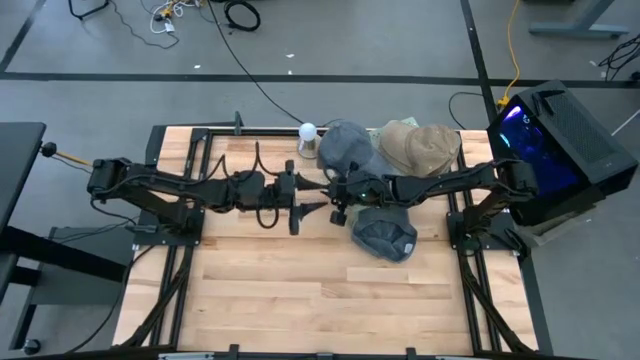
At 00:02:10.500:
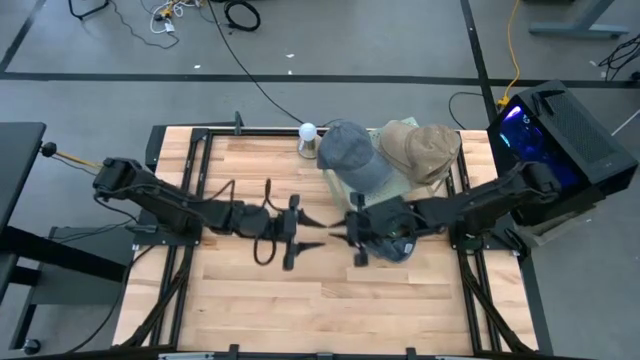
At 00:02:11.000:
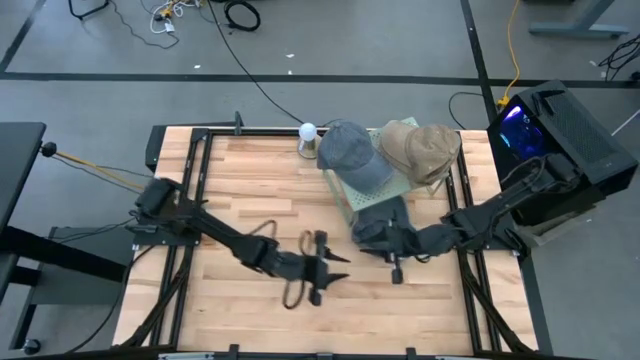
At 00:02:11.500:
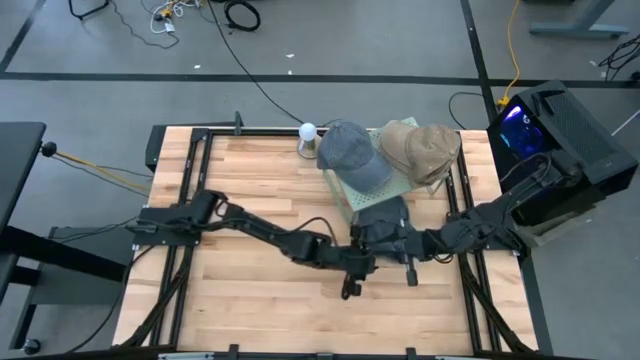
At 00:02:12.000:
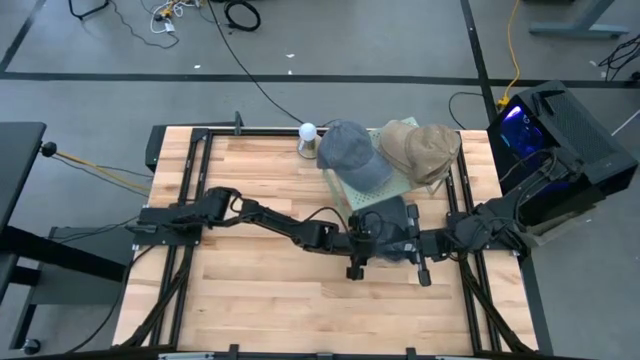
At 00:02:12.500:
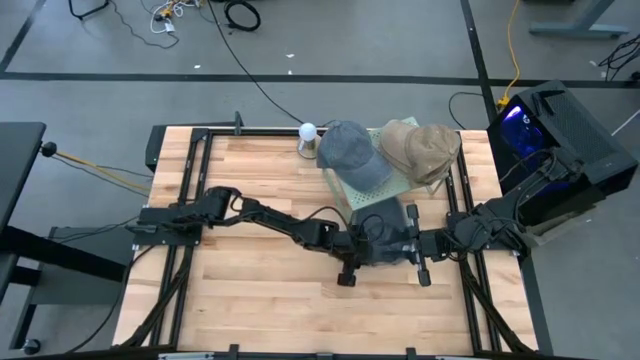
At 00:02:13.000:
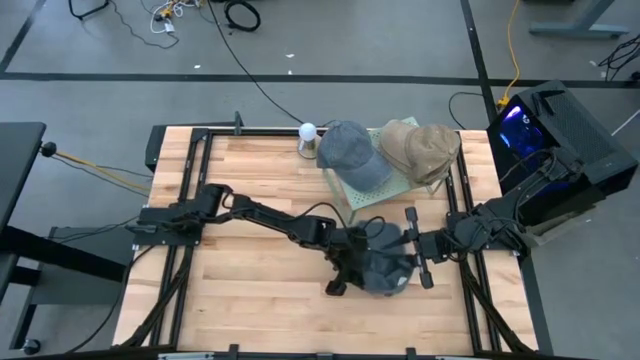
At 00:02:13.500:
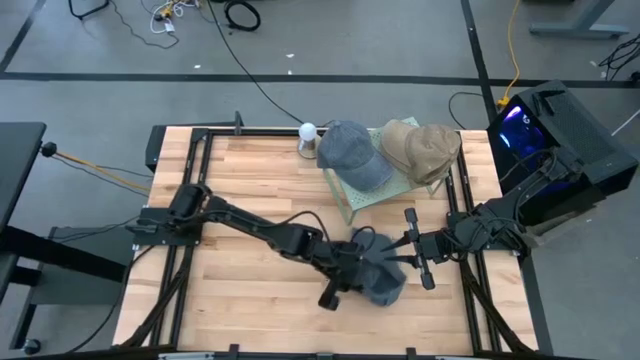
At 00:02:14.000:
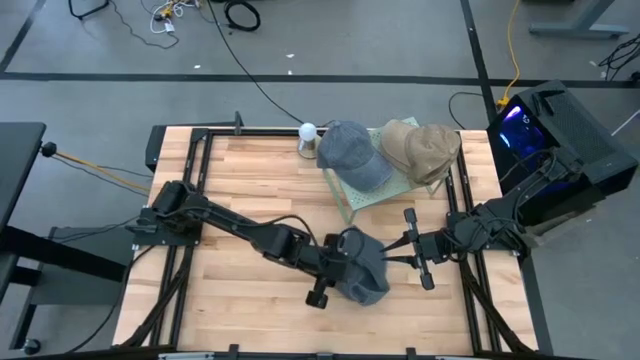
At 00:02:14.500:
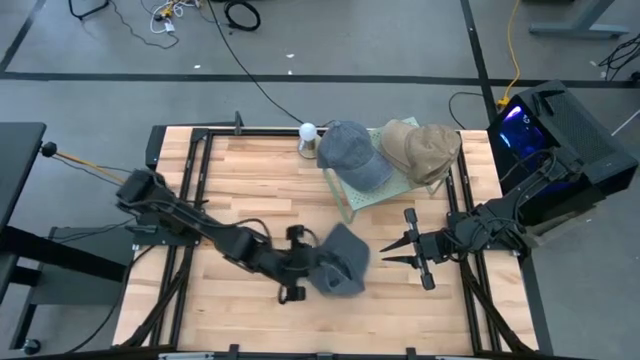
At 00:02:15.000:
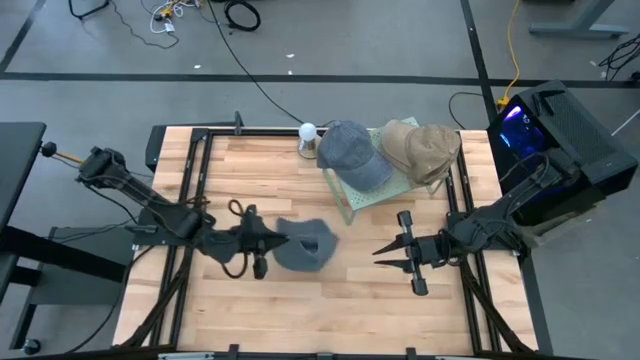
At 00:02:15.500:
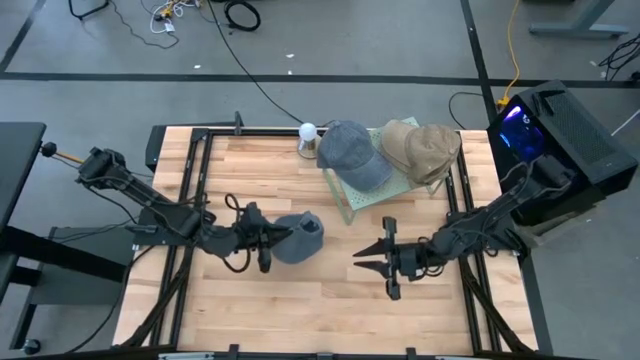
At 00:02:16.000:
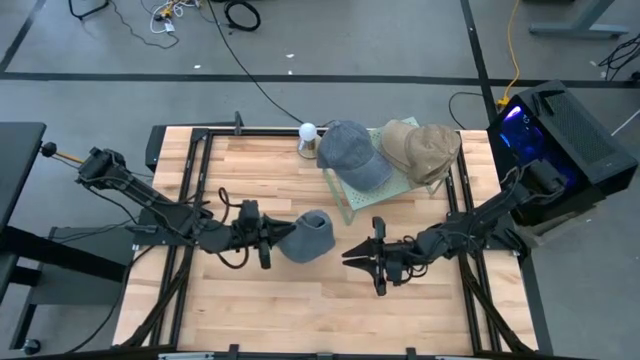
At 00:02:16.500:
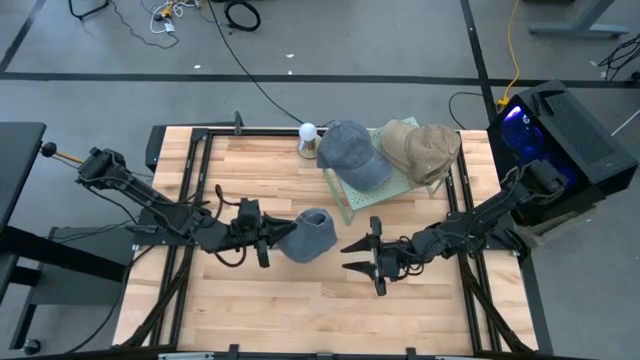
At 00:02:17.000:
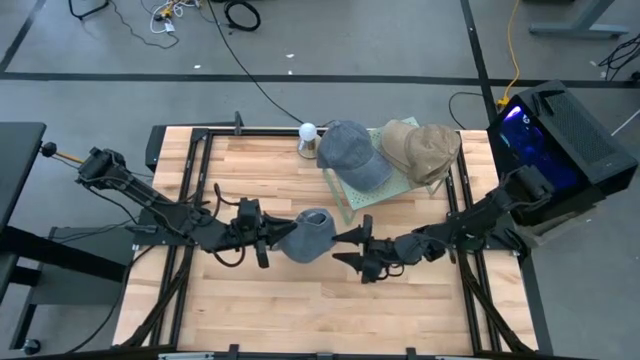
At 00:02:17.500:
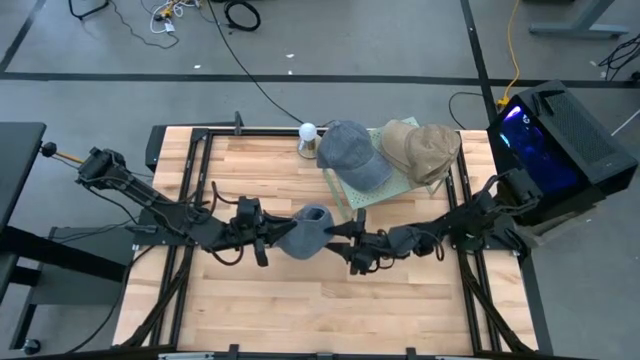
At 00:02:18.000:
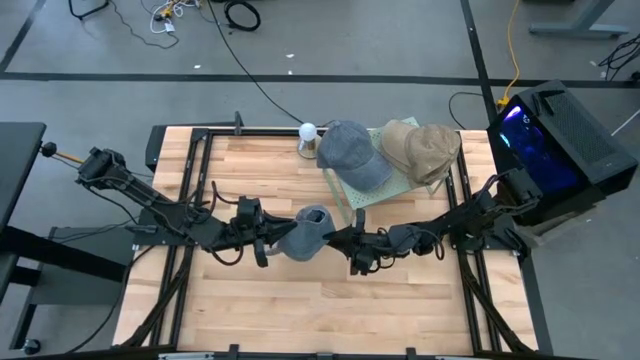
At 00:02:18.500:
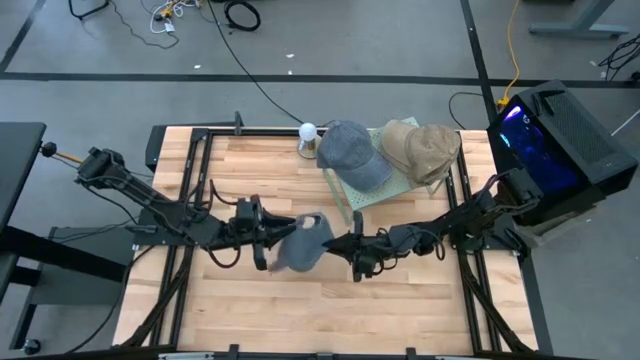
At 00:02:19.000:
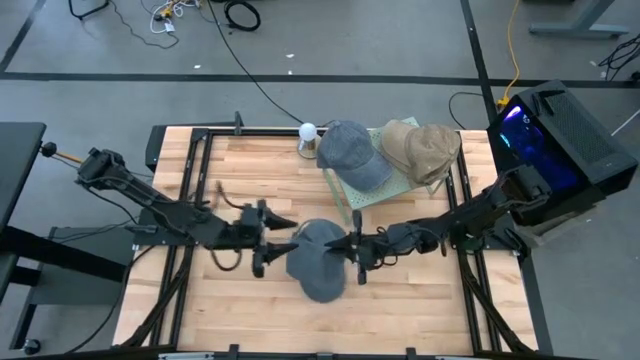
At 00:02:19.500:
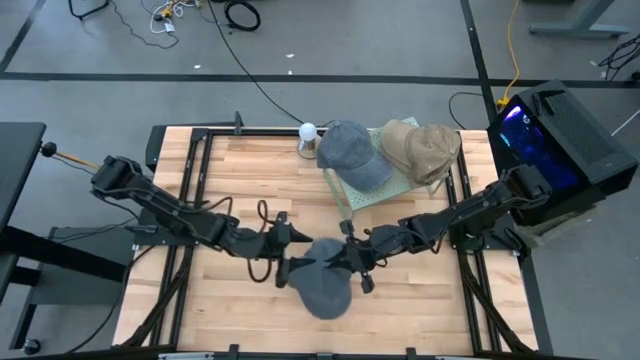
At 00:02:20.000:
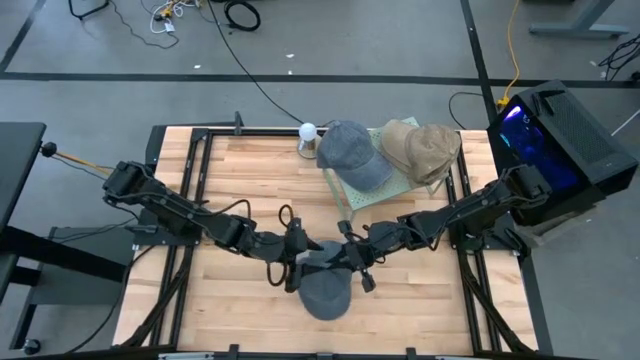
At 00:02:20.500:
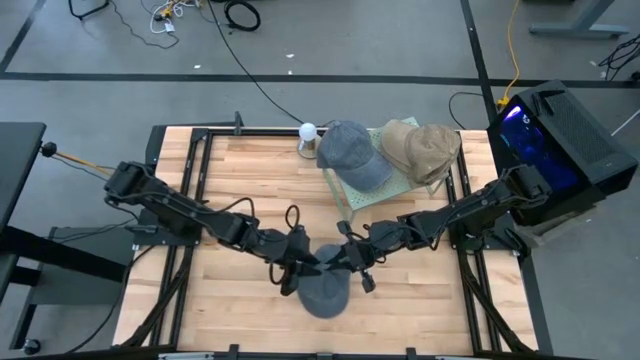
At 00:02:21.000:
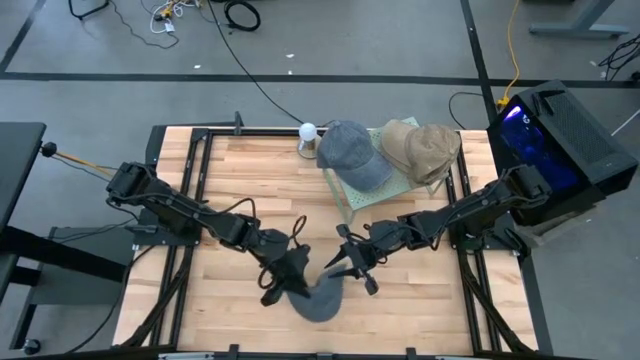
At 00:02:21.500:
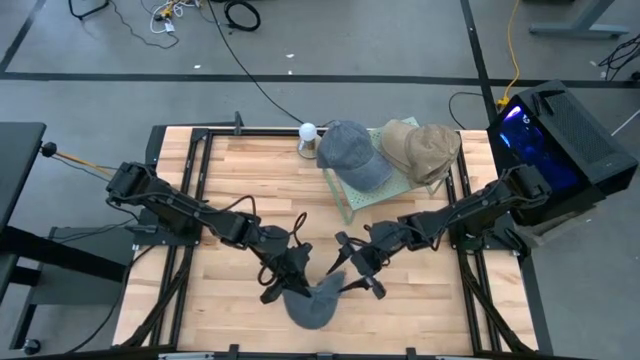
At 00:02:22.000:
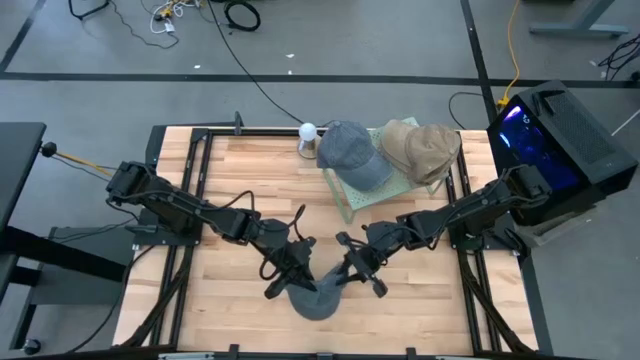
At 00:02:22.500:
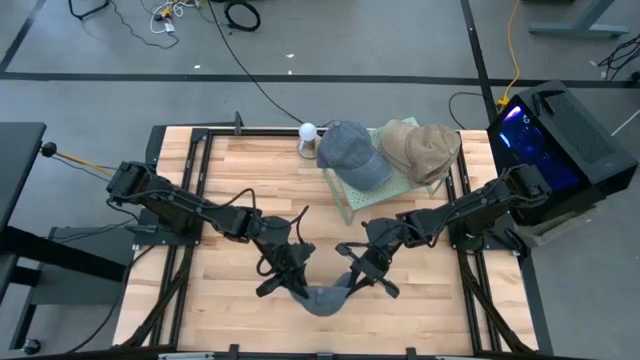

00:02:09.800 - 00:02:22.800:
Task: Stack caps on shelf
Stack the black cap on the black cap on the shelf

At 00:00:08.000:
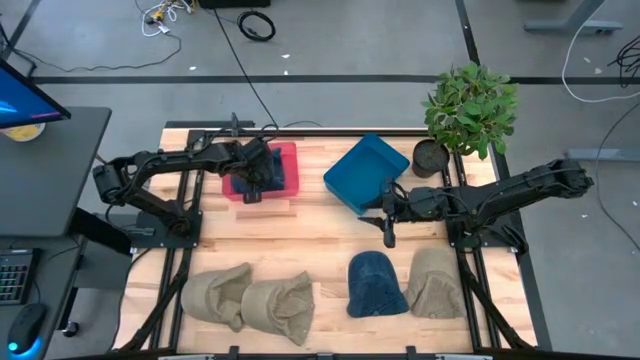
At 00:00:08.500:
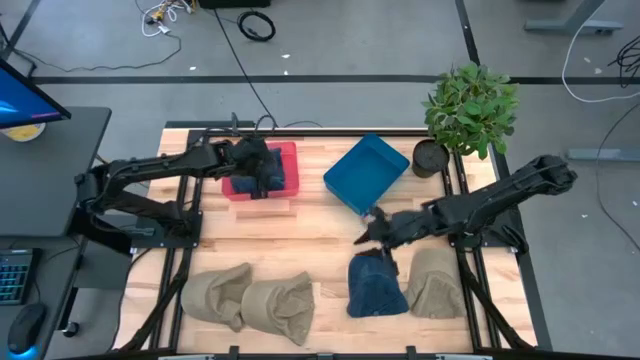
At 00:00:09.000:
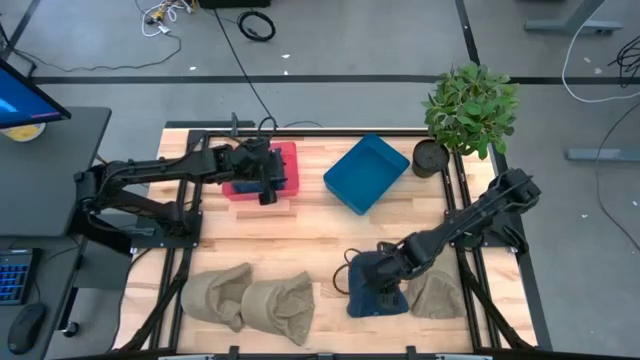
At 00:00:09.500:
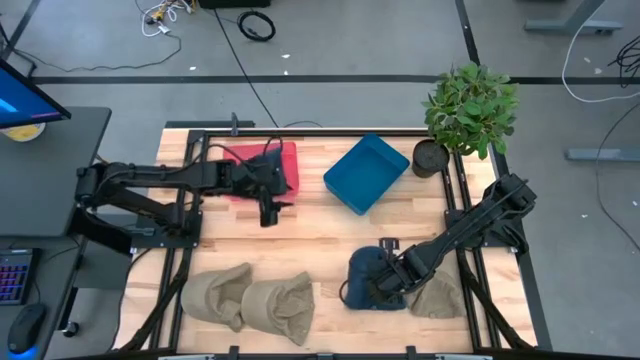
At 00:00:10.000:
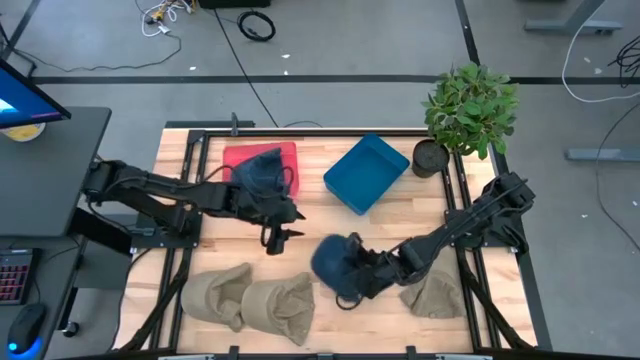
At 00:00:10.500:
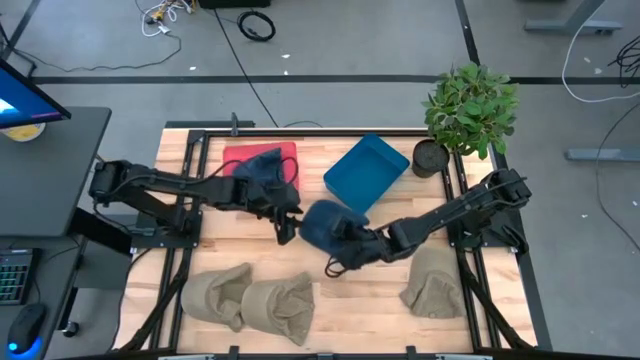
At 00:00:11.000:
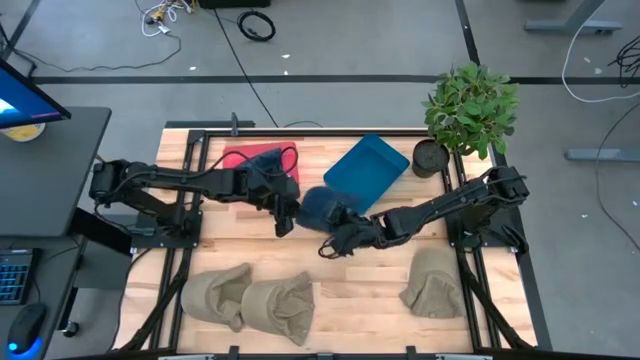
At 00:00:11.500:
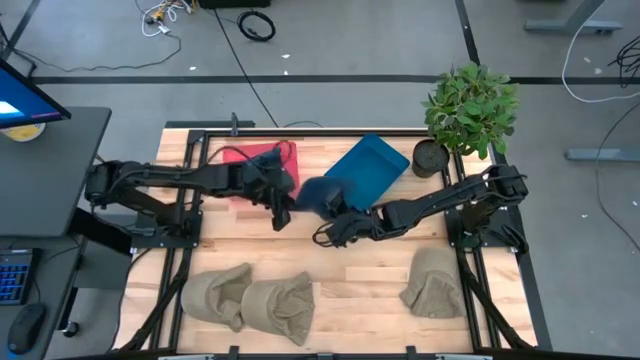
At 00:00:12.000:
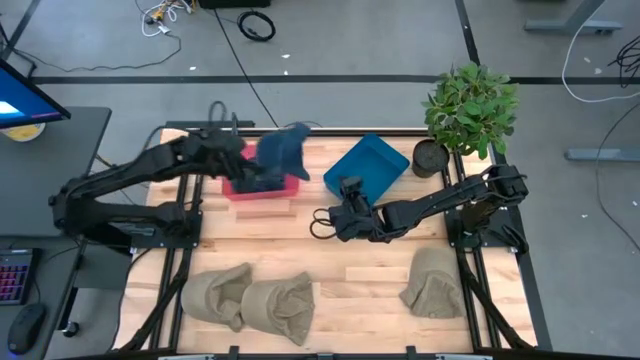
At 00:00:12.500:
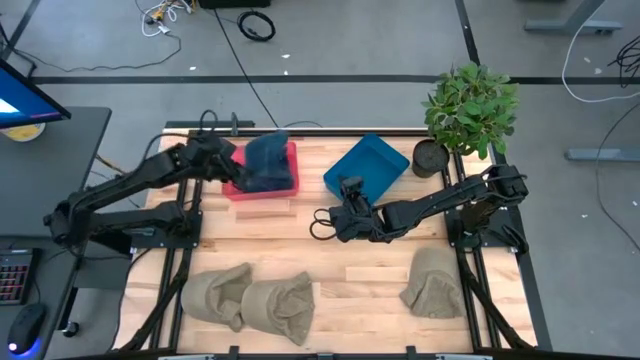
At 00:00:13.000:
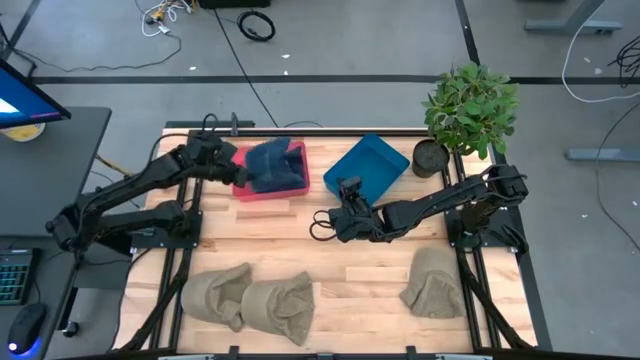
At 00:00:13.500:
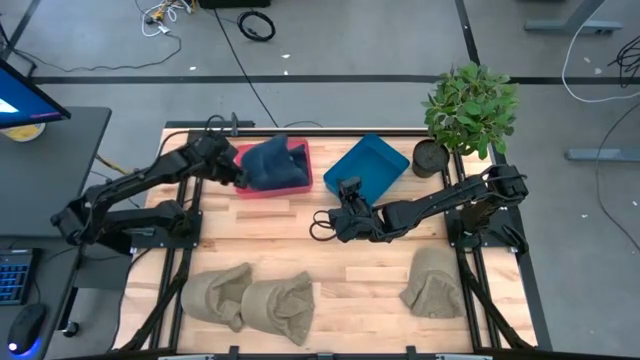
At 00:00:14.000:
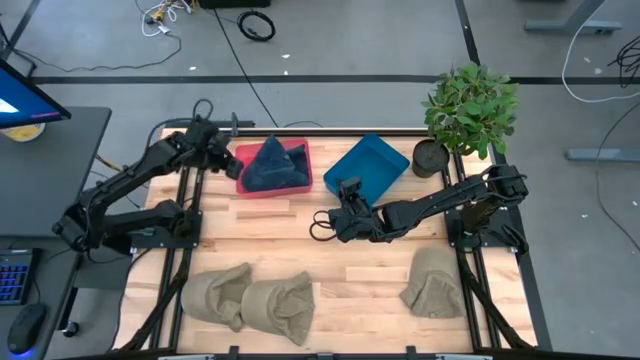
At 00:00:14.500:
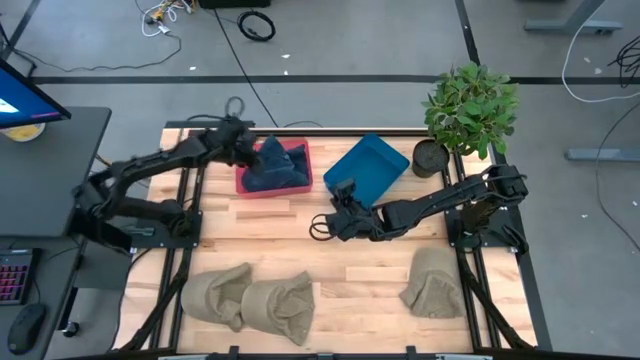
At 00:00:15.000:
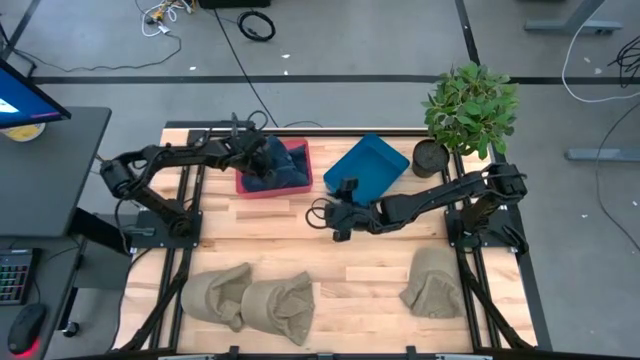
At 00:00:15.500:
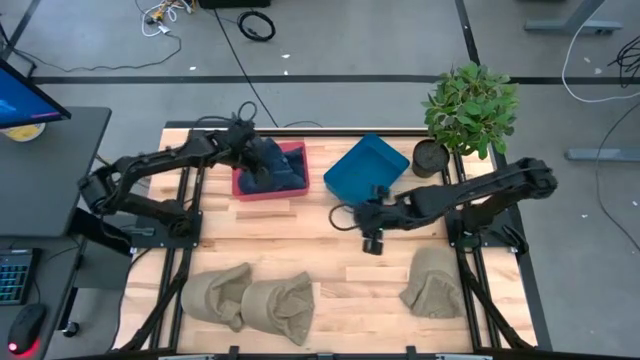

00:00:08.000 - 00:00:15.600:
Task: Pick & Place hat
Put the blue cap into the pink bin
